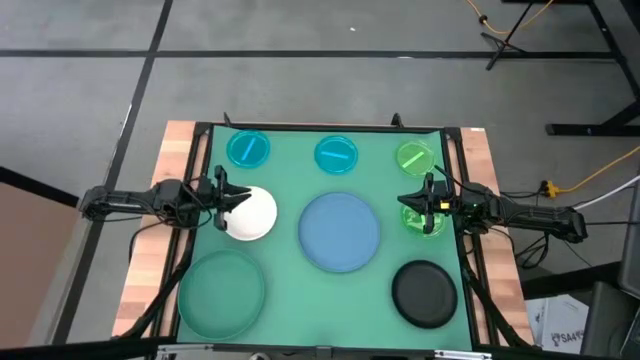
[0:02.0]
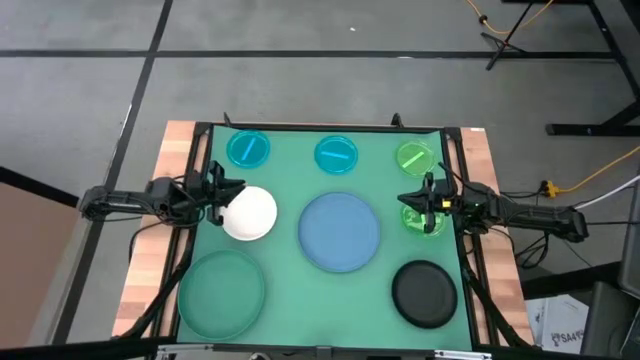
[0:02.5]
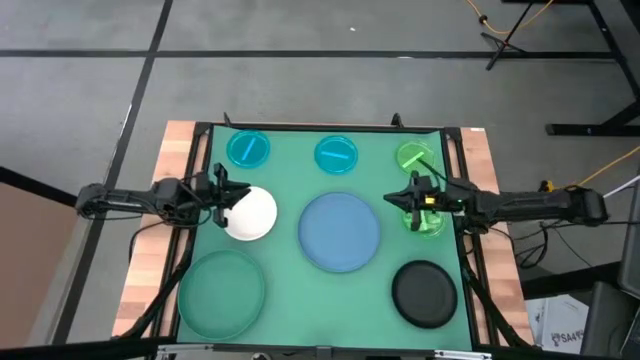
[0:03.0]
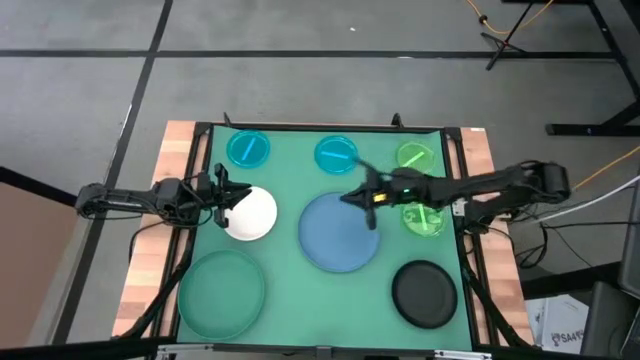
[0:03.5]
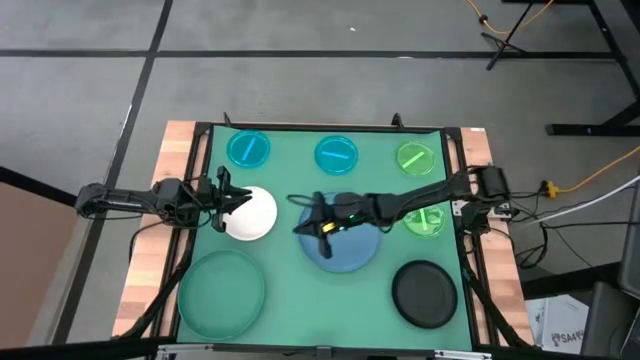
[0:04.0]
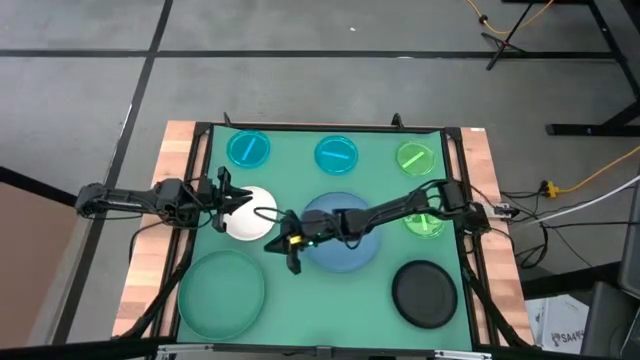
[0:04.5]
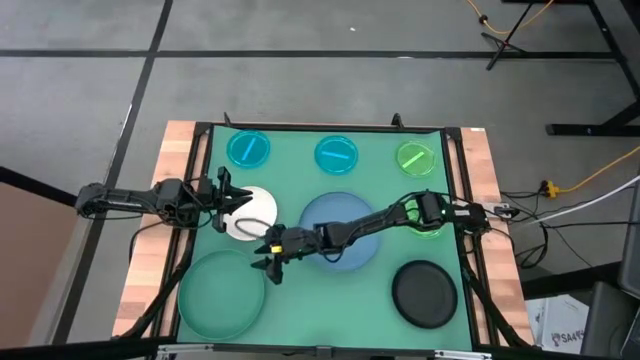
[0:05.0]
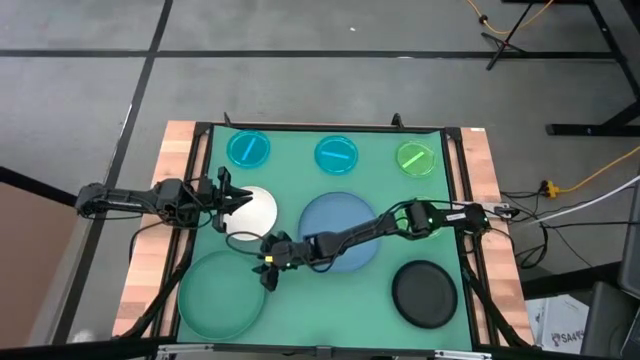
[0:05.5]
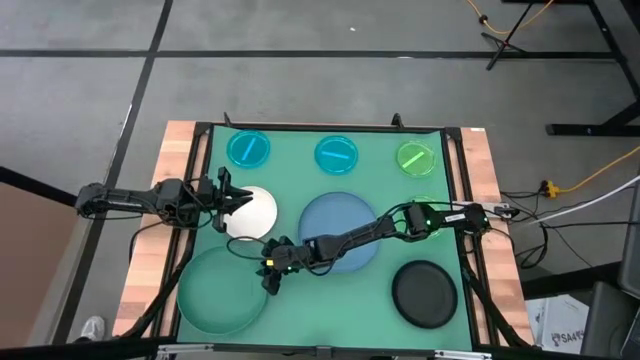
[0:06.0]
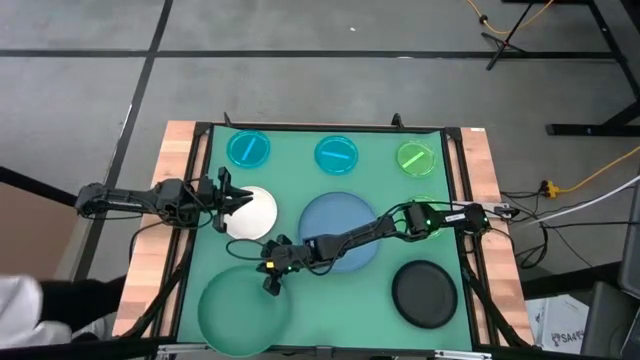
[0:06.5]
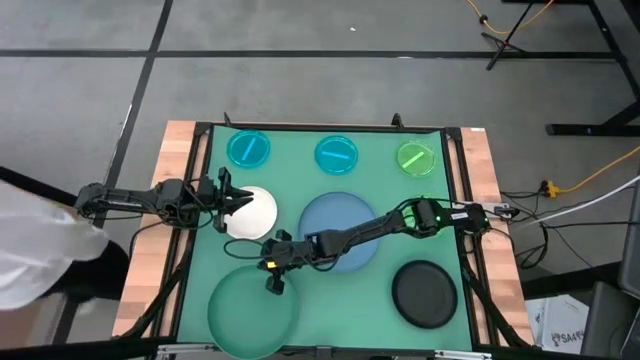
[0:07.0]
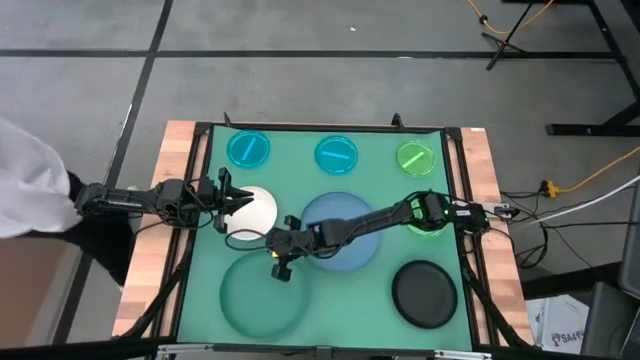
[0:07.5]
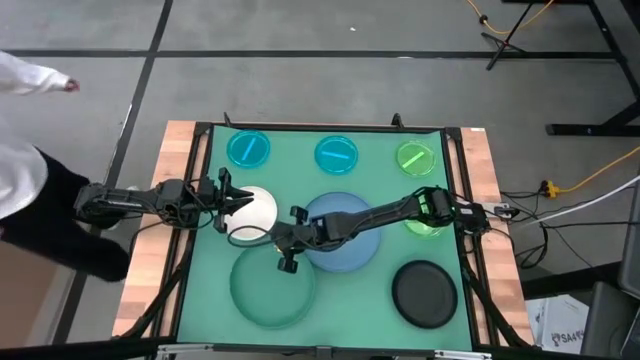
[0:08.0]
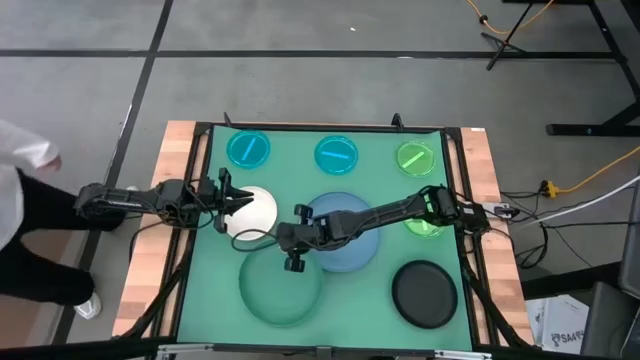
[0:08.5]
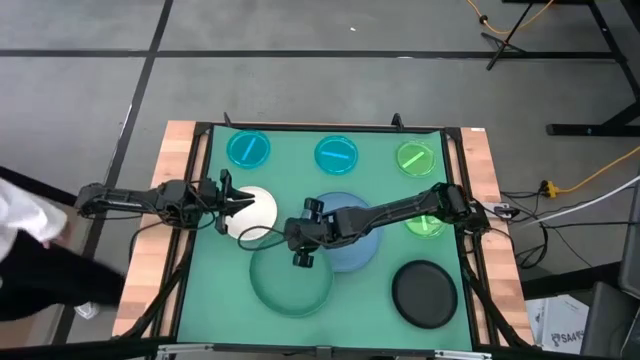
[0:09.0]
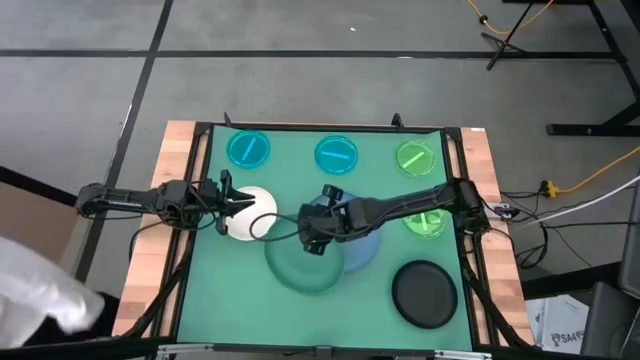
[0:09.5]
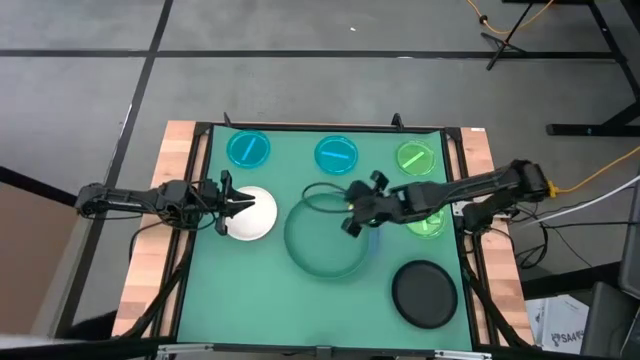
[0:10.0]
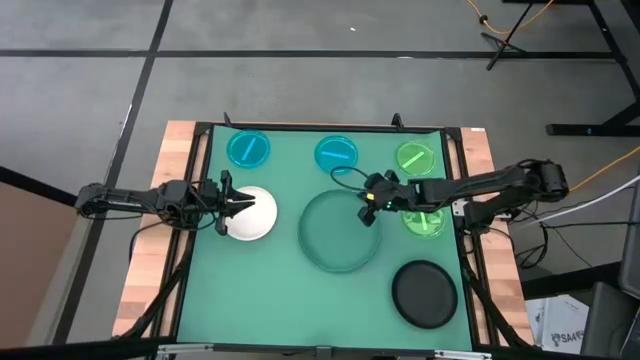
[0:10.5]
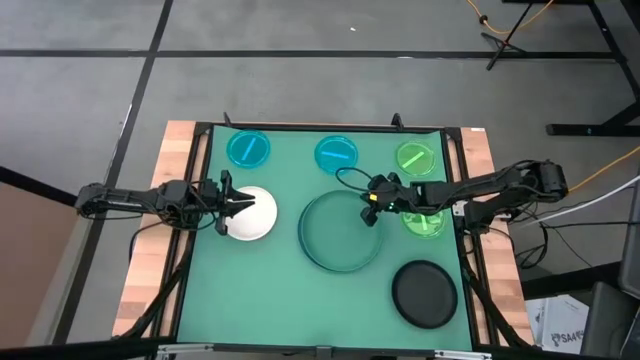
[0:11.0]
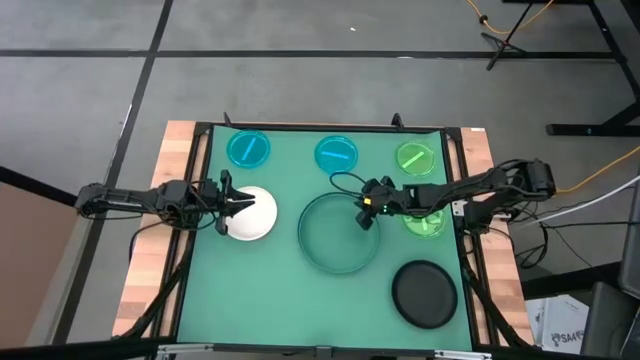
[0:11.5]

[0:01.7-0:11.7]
Task: Stack plastic plates
Stack the green plate on top of the blue plate

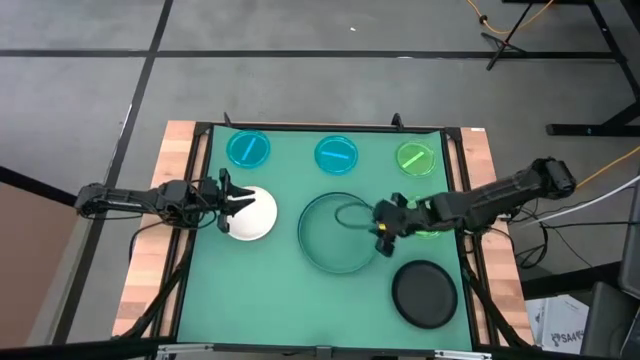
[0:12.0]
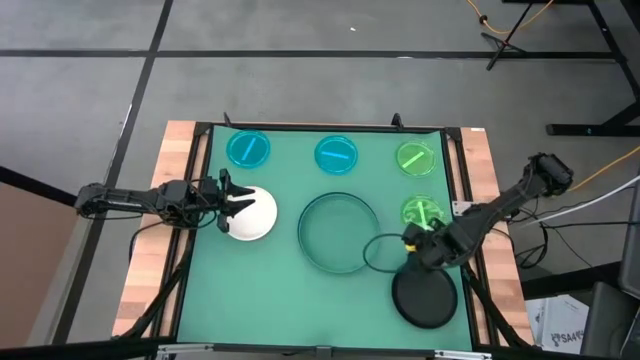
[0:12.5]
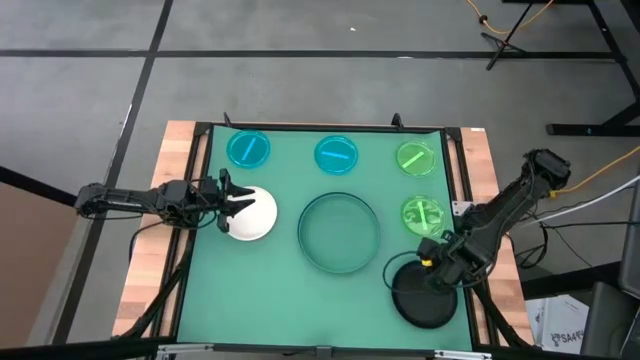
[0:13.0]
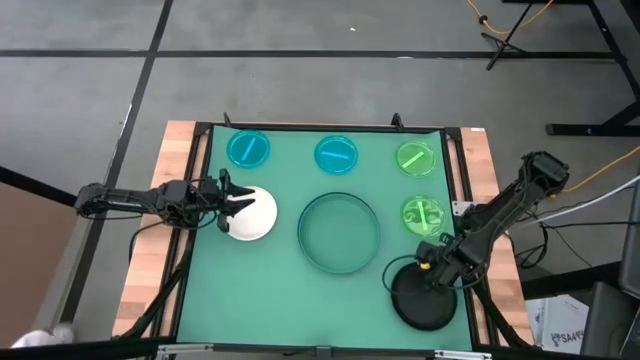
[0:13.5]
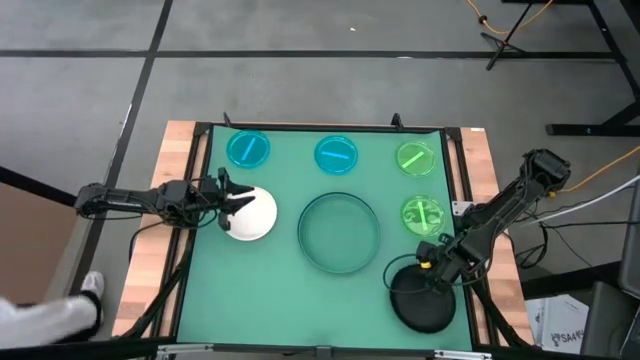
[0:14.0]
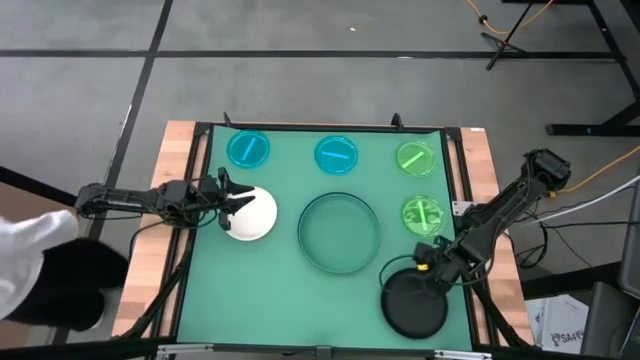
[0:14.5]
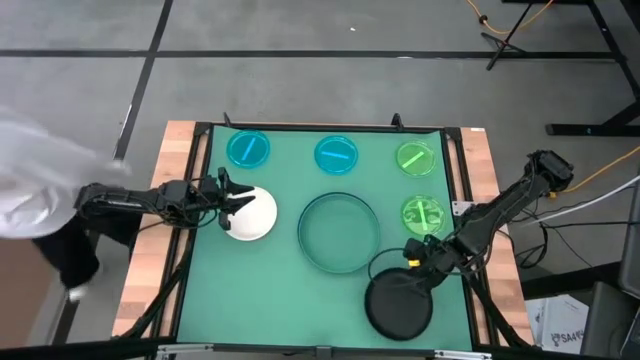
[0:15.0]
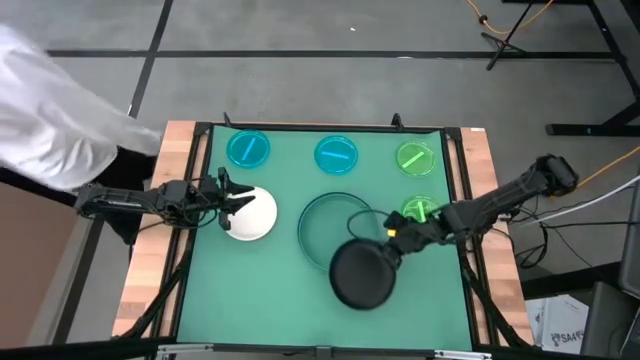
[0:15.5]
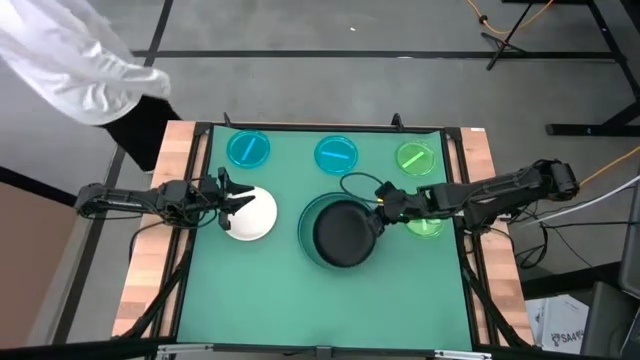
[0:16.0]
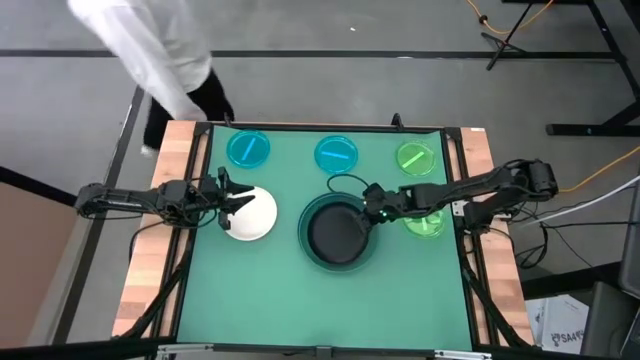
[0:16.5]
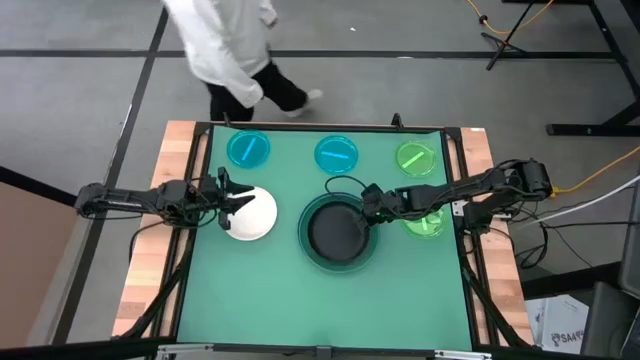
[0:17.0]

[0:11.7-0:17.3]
Stack the black plate on top of the green plate

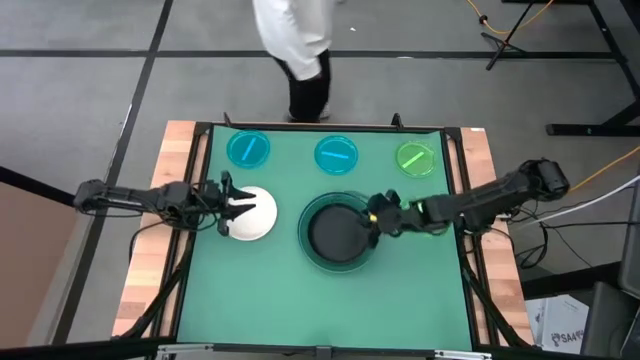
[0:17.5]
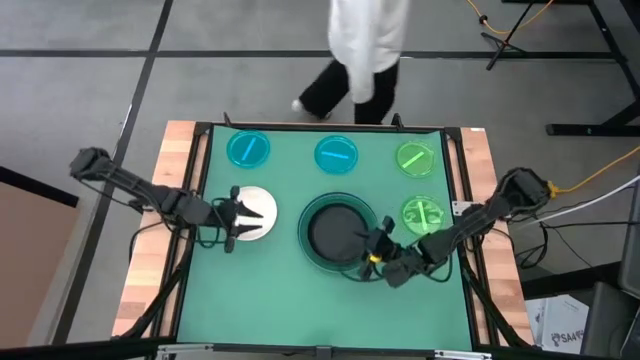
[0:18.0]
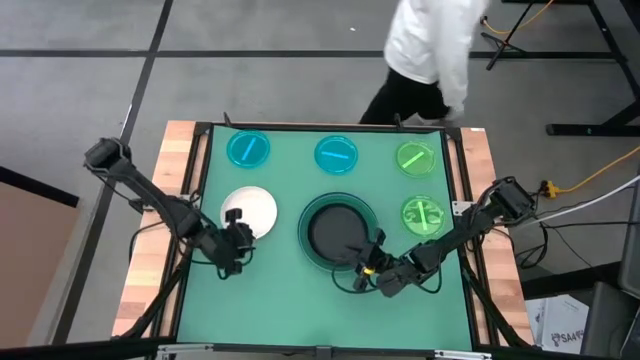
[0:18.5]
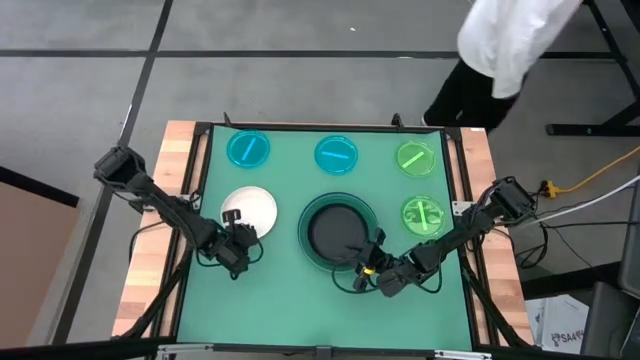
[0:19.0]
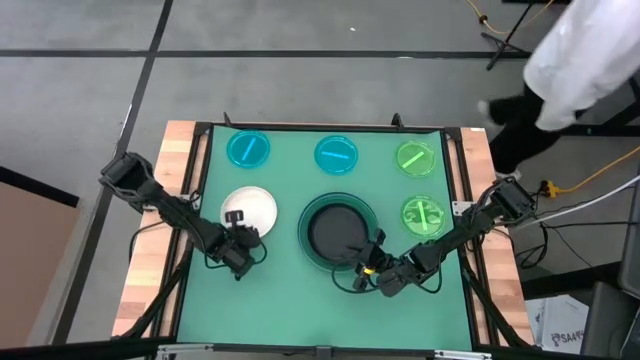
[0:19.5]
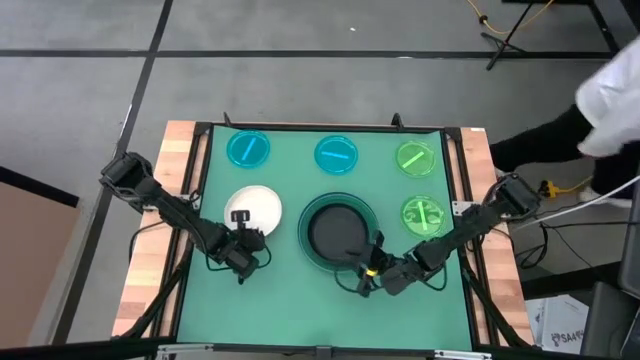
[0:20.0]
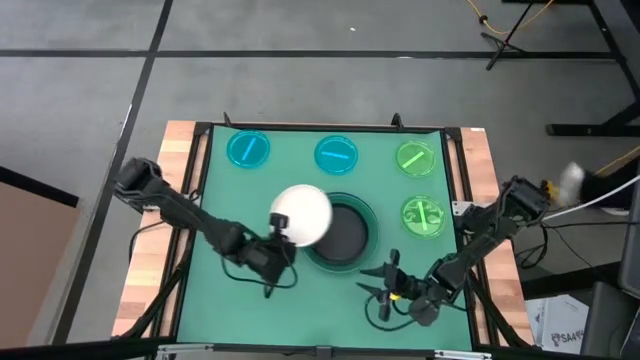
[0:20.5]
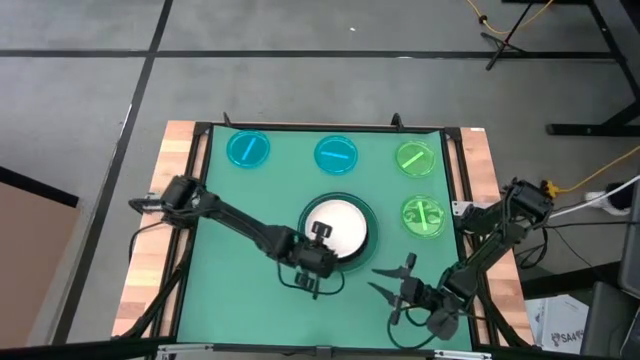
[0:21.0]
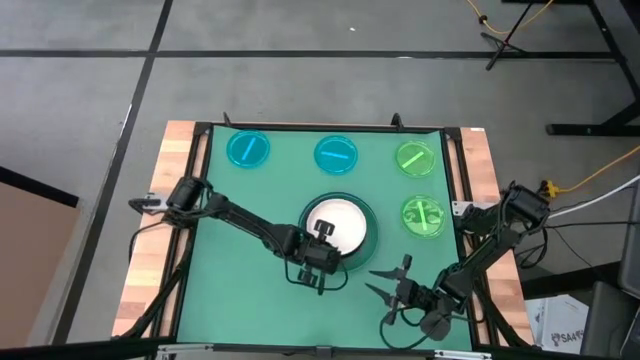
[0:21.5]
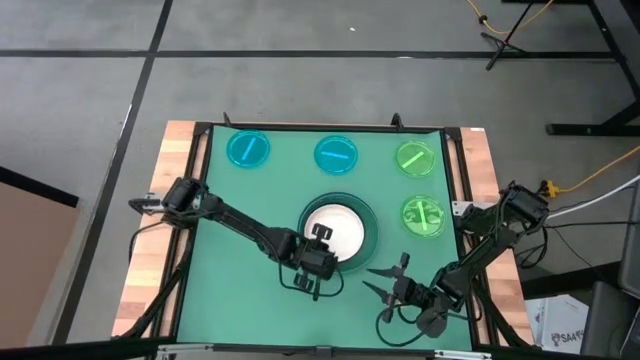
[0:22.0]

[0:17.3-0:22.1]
Stack the white plate on top of the black plate
